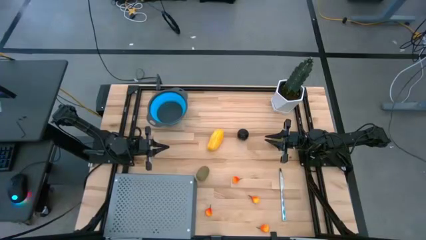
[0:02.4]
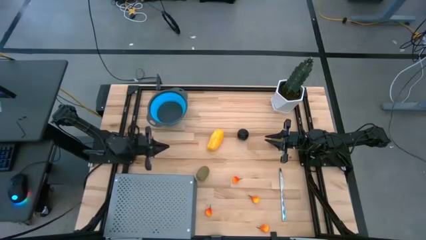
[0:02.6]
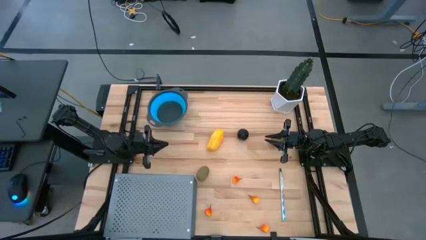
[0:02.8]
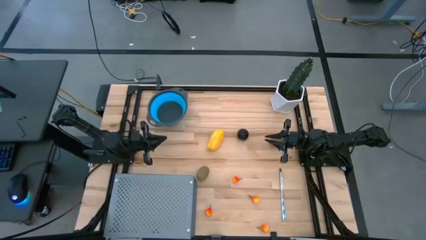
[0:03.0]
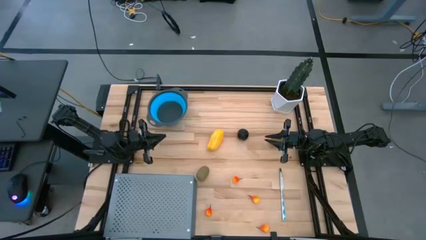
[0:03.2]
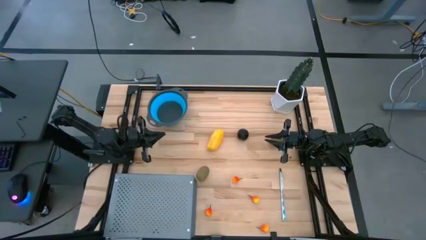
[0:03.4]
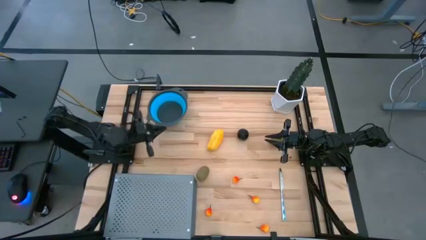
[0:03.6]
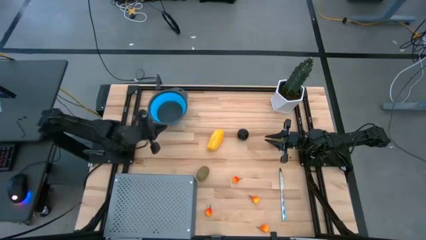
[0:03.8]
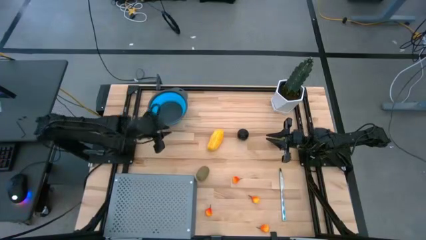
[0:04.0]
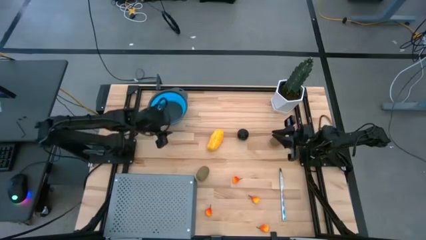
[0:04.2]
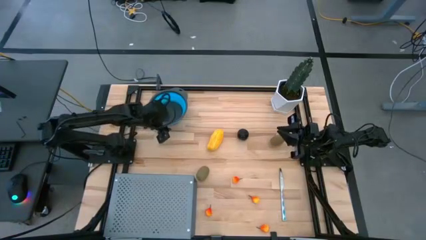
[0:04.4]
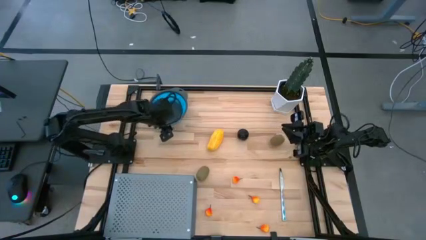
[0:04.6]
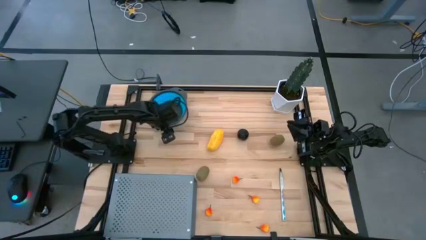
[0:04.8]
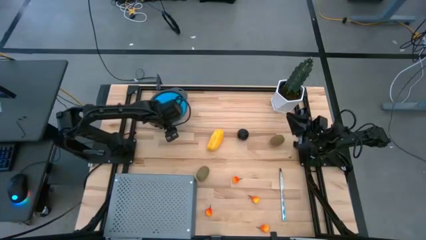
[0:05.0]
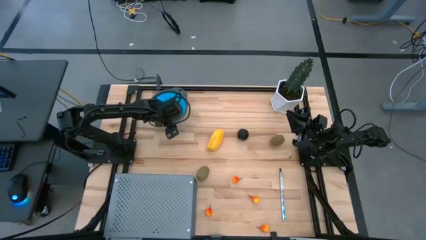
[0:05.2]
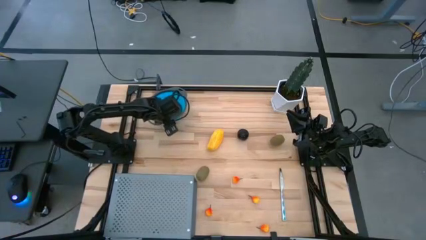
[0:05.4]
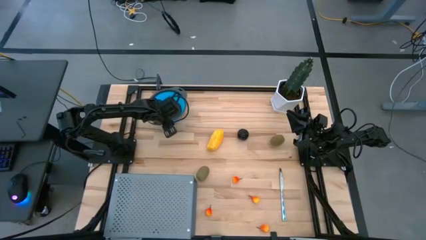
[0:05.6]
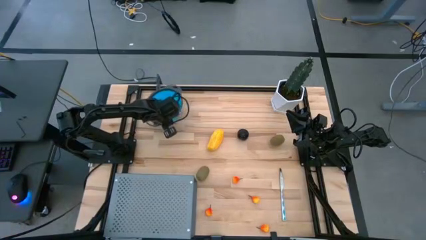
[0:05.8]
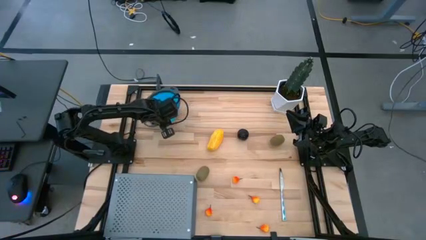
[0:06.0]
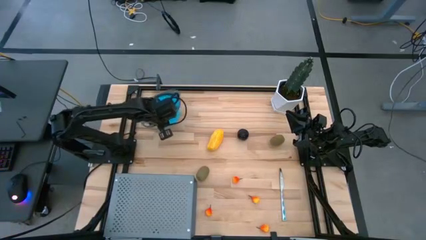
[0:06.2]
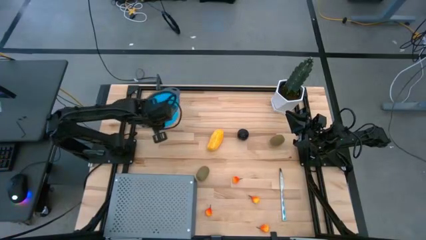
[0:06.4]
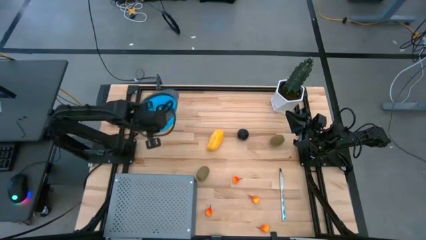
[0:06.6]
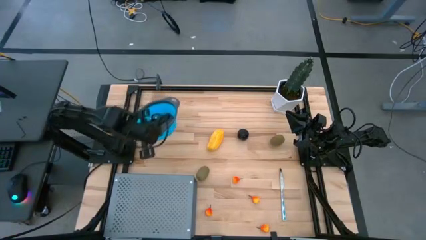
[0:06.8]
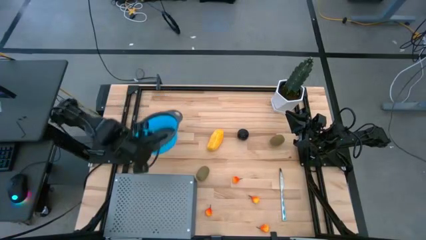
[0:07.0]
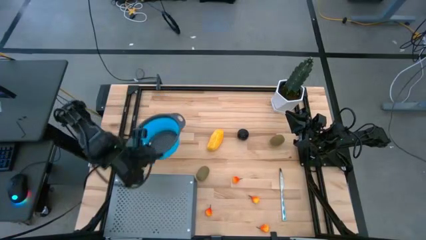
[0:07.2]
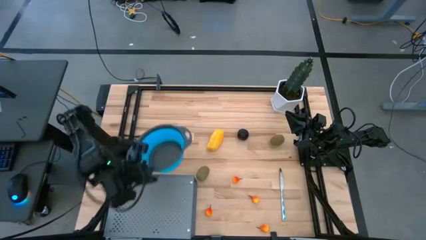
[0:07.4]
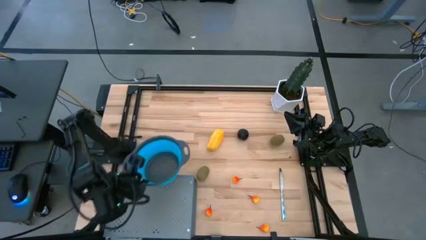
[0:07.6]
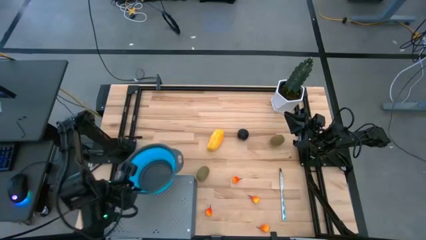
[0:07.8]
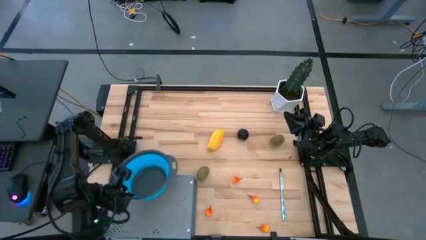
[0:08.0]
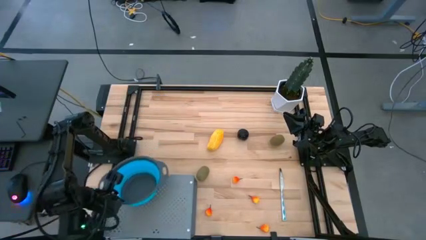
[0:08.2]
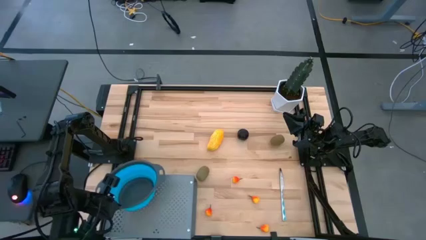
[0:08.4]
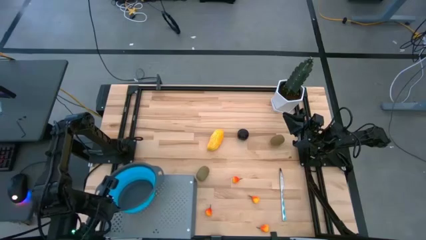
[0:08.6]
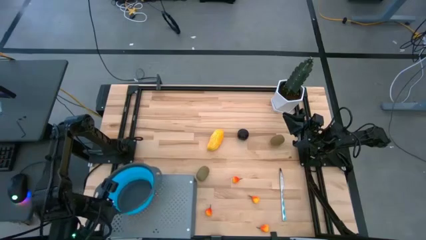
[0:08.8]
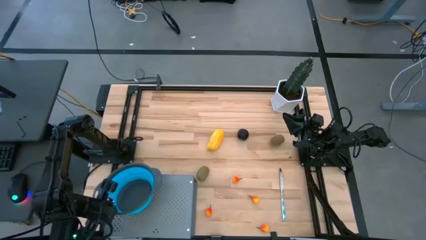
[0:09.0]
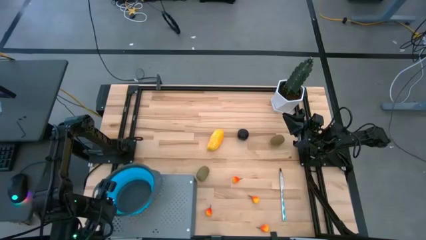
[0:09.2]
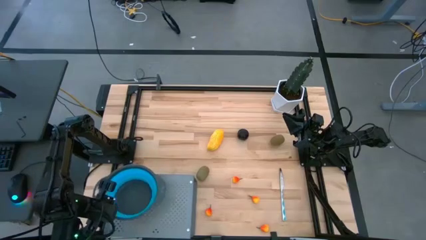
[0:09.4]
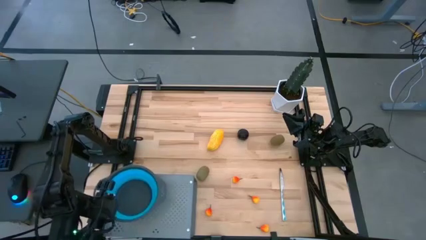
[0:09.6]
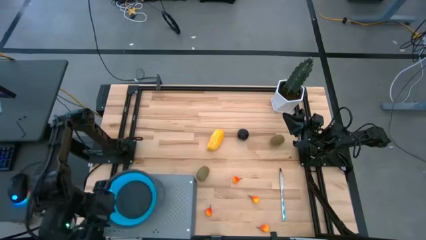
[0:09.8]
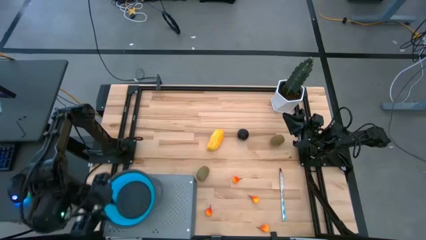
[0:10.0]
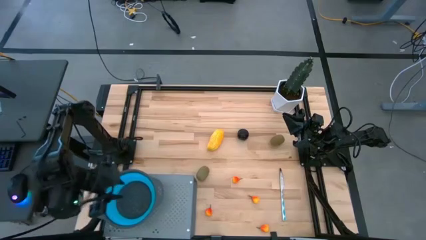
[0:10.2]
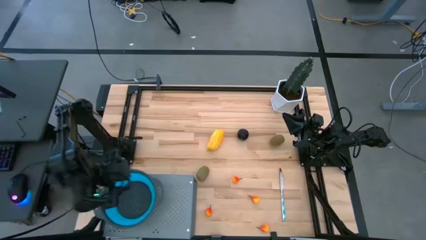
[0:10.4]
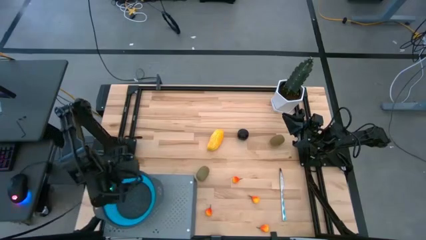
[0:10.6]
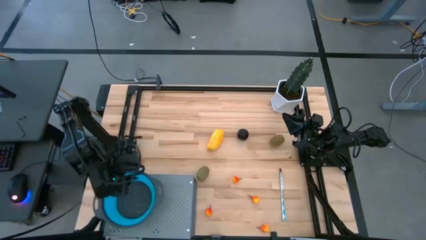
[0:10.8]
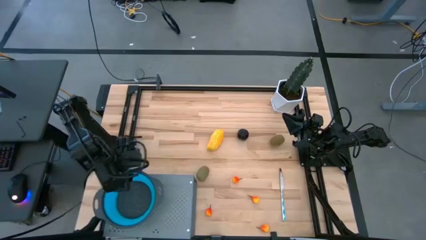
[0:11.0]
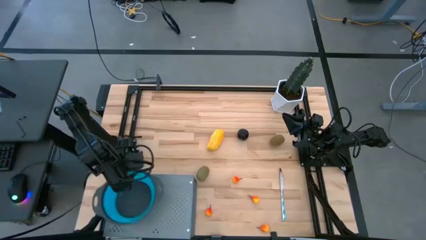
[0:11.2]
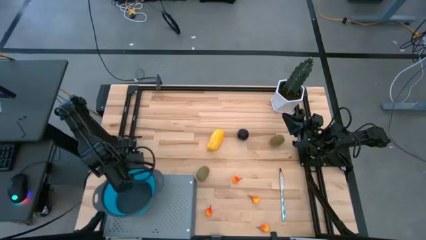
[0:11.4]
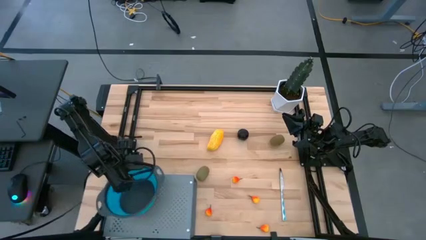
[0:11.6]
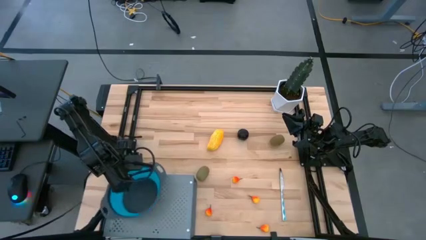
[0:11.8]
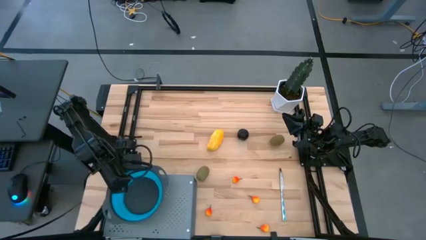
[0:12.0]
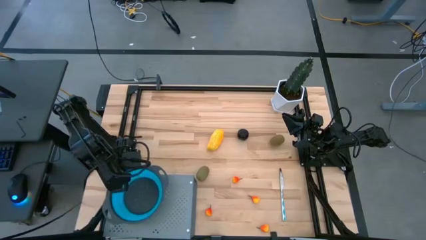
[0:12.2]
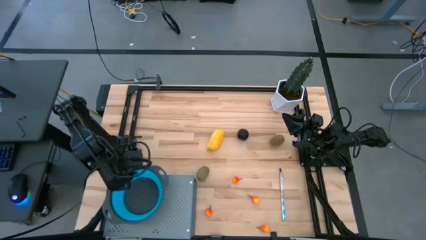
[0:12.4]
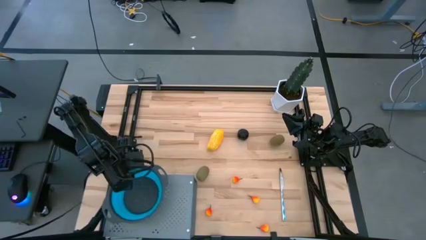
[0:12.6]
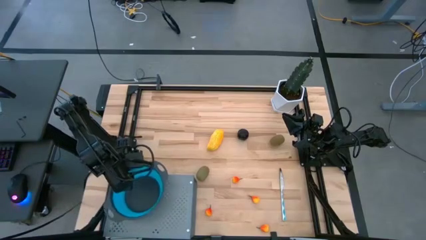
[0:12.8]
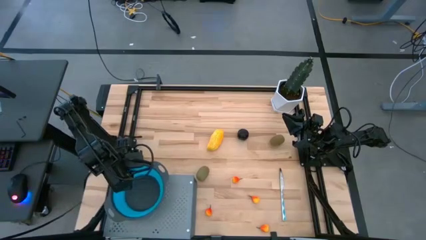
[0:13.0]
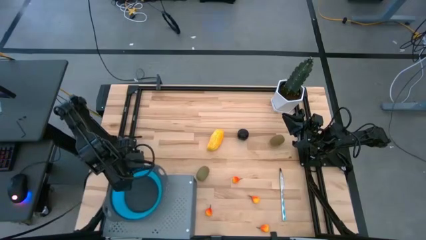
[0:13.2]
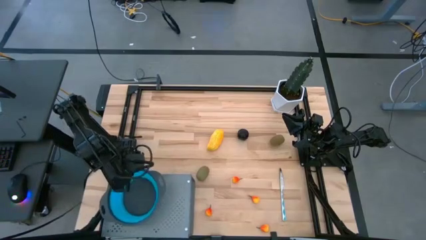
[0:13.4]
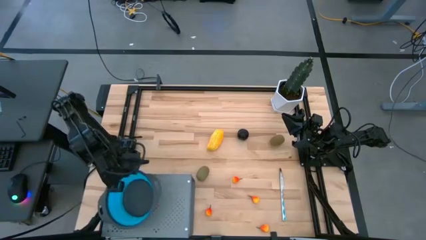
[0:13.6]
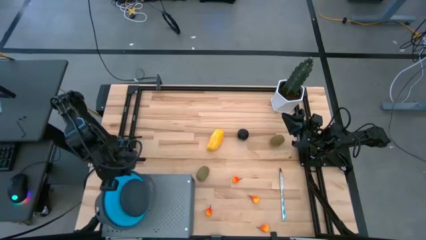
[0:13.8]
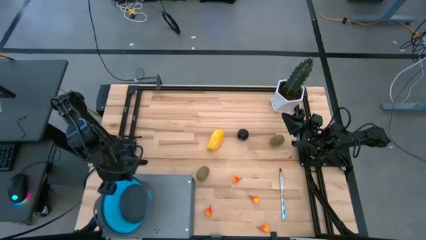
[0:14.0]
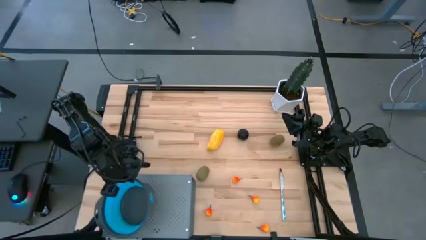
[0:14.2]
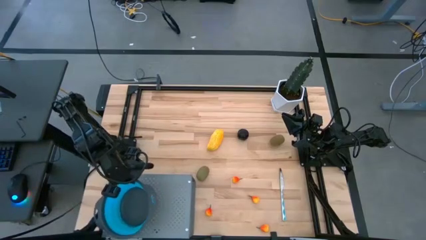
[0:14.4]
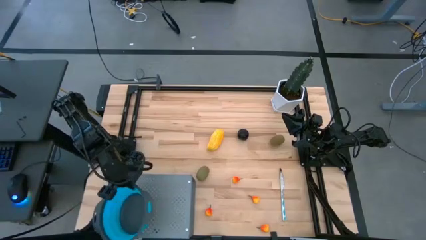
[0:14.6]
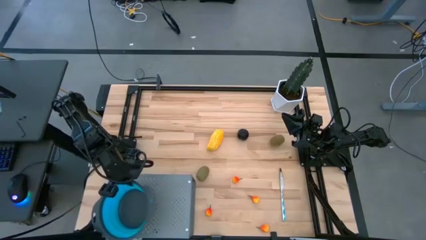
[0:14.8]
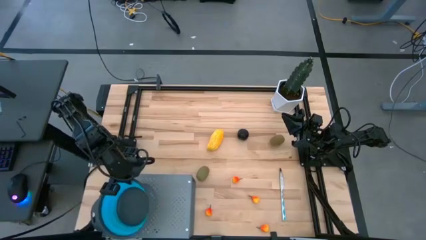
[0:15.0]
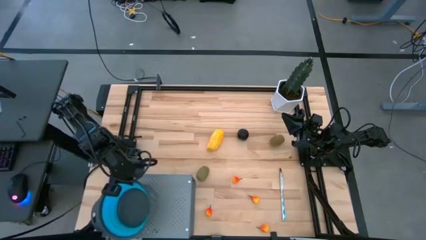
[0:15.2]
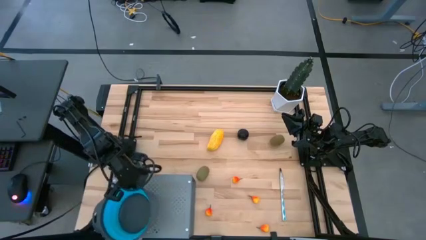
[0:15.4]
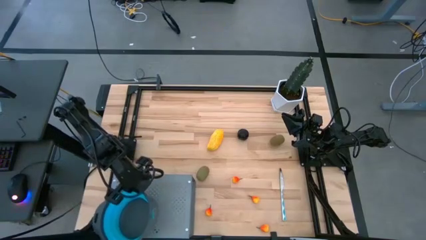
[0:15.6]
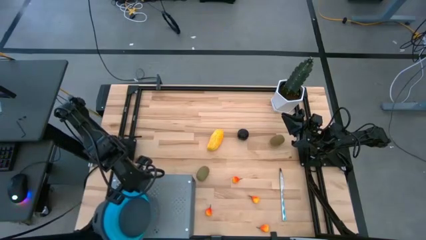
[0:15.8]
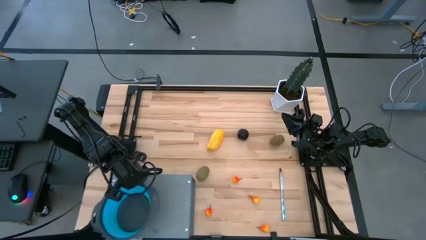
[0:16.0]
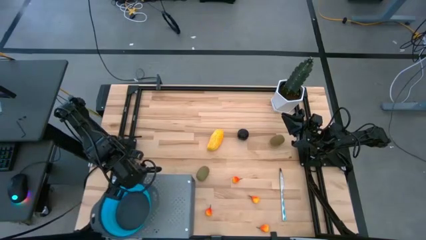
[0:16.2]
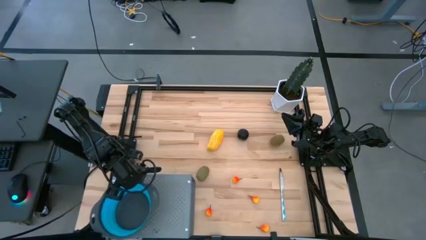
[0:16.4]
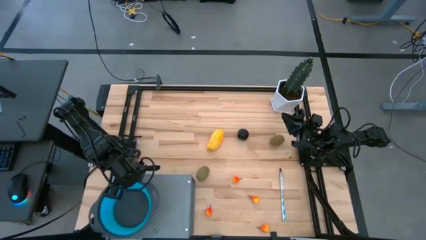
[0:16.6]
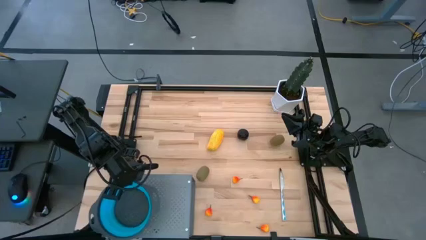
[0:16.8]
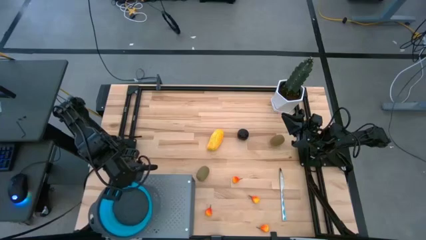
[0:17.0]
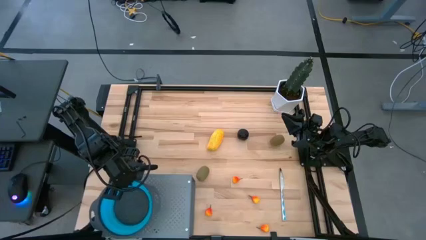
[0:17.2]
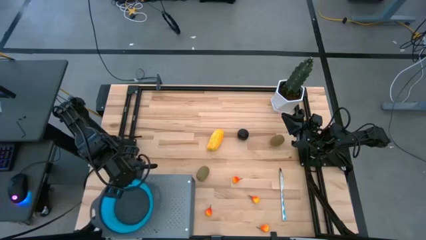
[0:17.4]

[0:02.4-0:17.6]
Task: Pick & Place Fruit
Put the strainer bowl on the shelf
